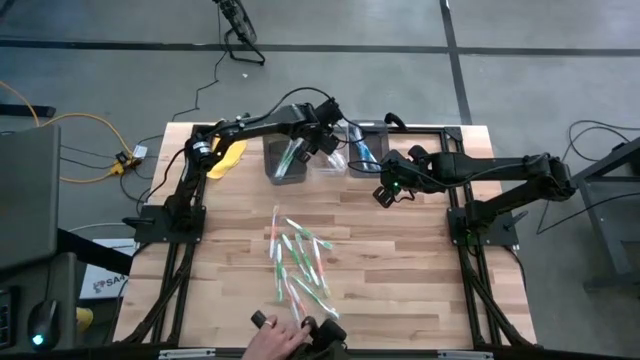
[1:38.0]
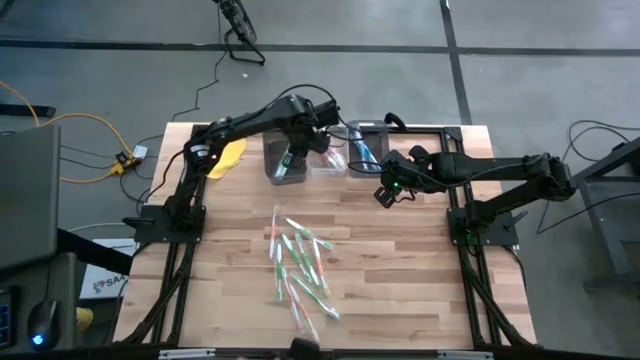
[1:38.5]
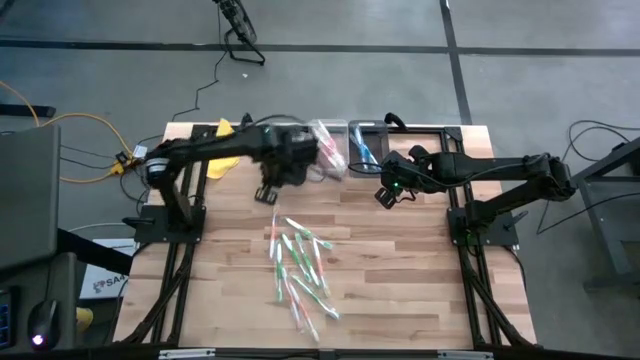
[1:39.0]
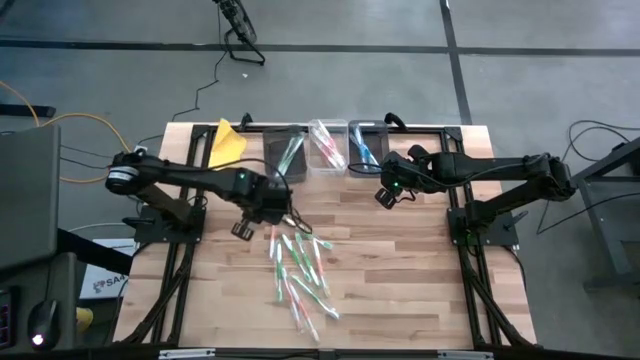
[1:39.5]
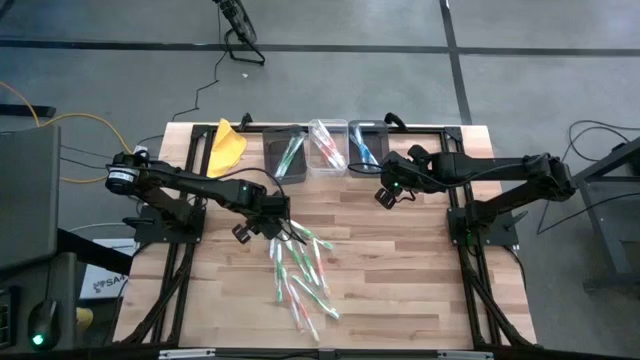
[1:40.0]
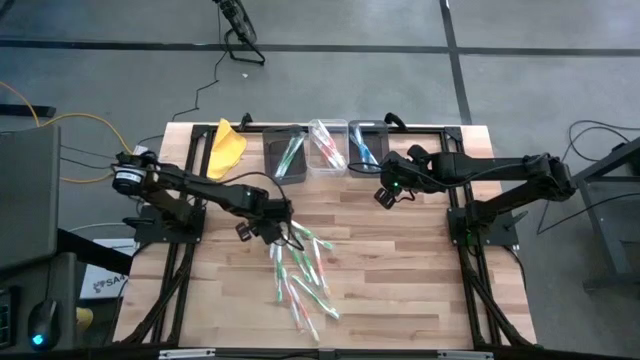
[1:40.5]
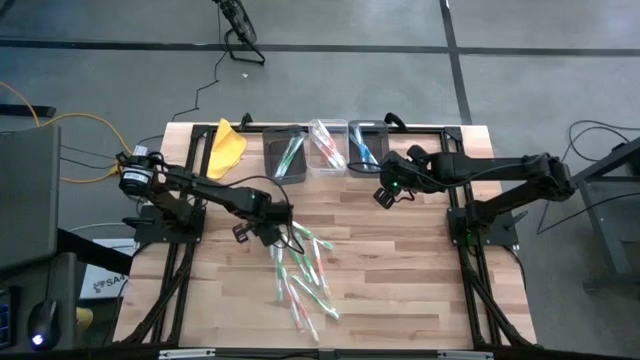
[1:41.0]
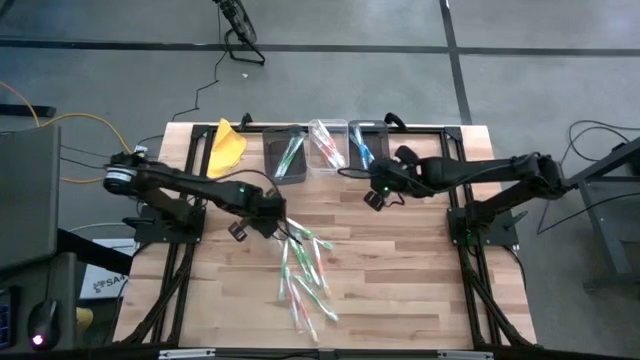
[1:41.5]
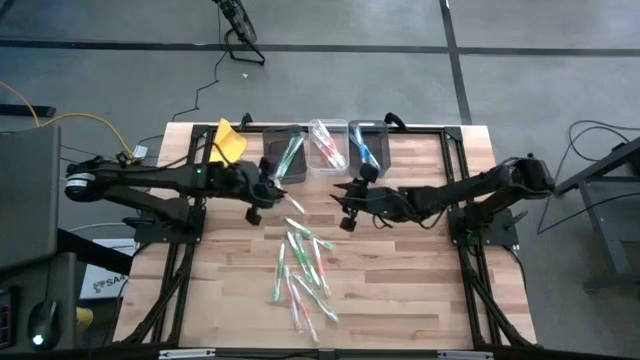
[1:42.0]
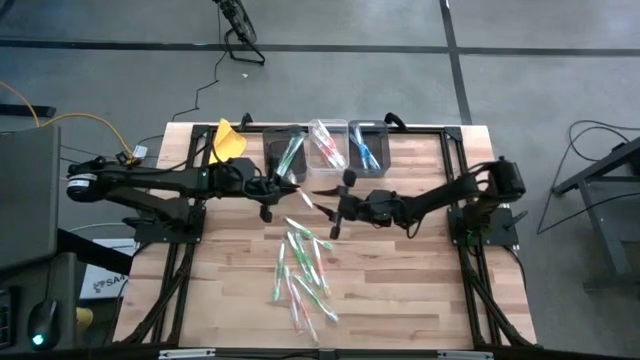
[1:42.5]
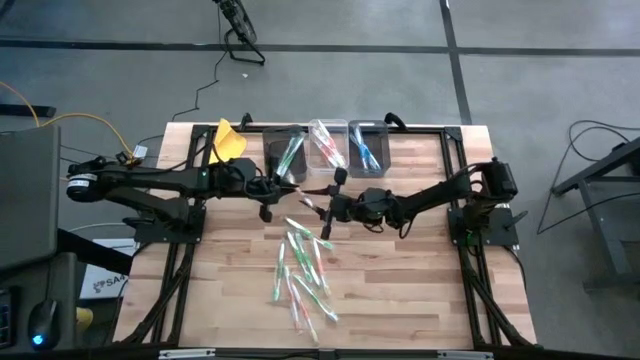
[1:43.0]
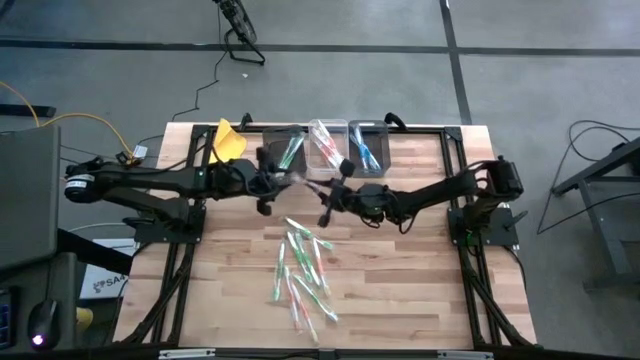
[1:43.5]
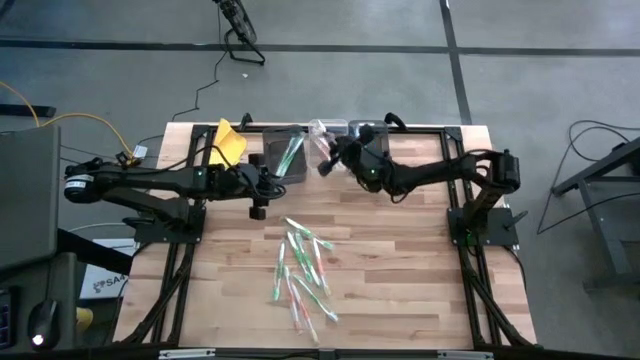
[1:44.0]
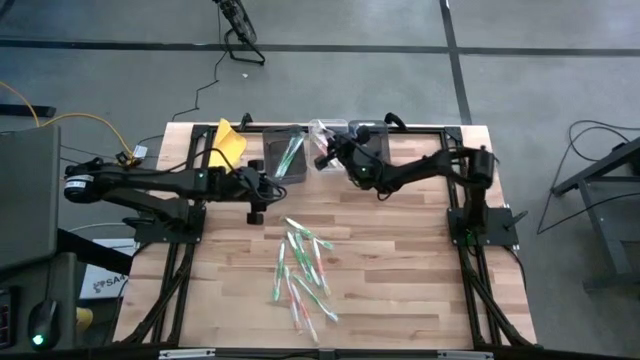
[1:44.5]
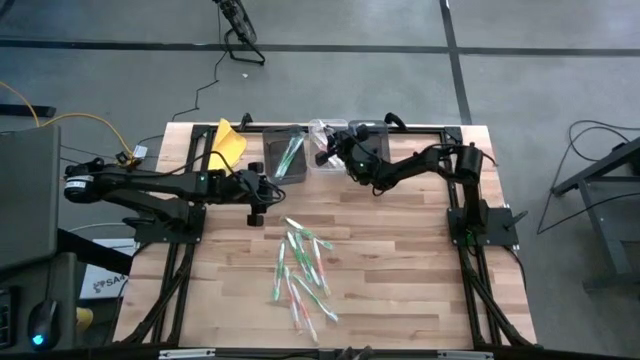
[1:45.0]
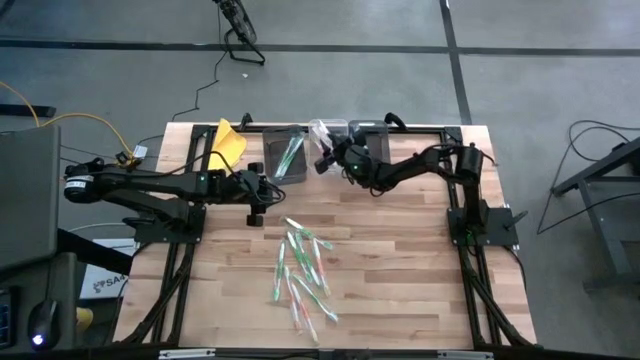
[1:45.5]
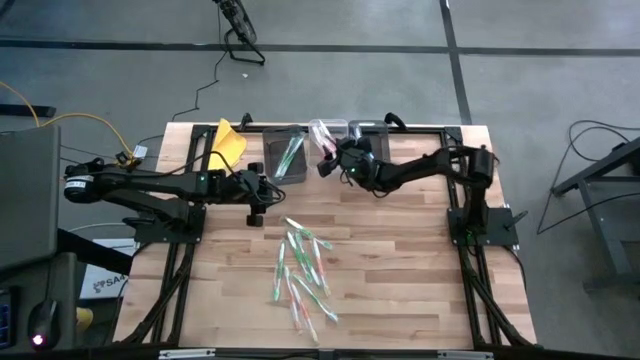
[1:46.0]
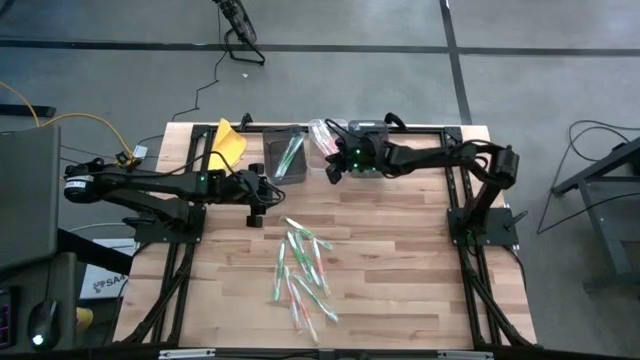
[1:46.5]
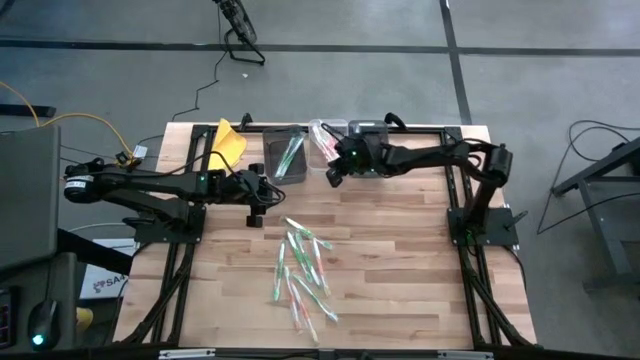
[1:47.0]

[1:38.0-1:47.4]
Task: Pick & Place Toothbrushes
Put the orange toothbrush into the transparent bin

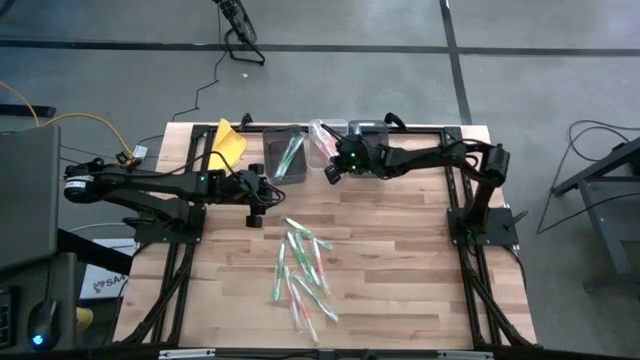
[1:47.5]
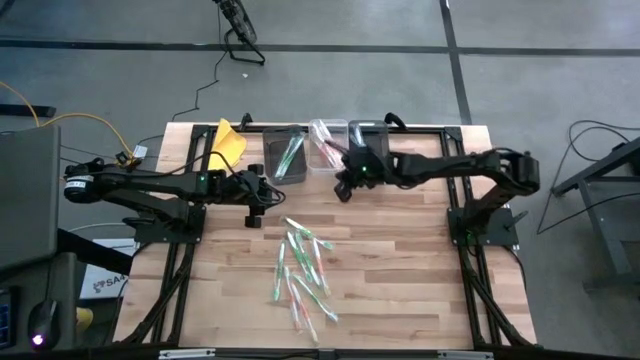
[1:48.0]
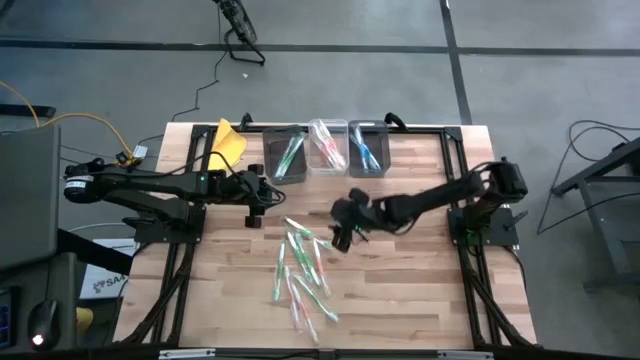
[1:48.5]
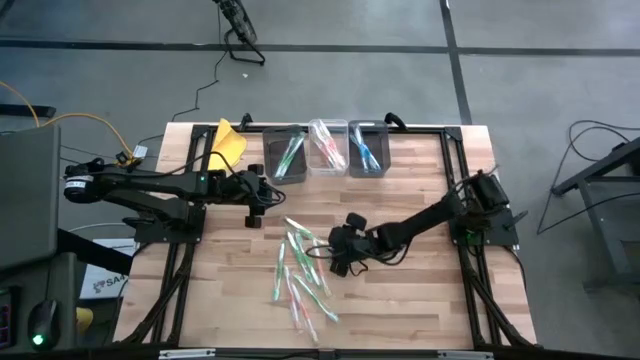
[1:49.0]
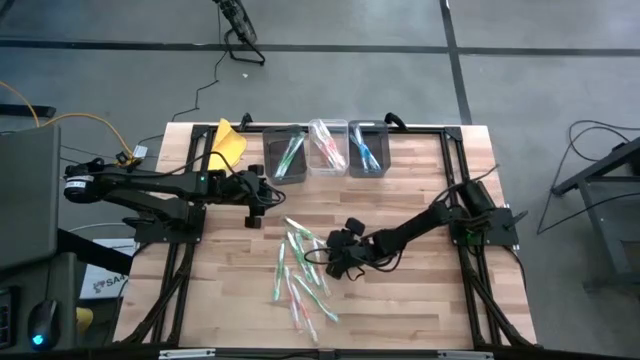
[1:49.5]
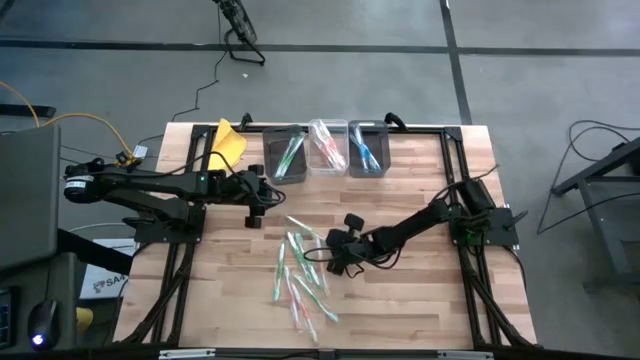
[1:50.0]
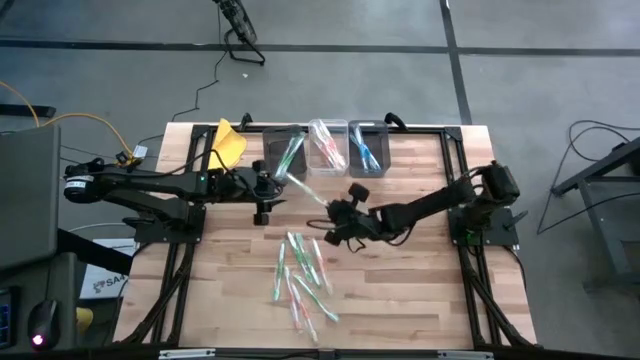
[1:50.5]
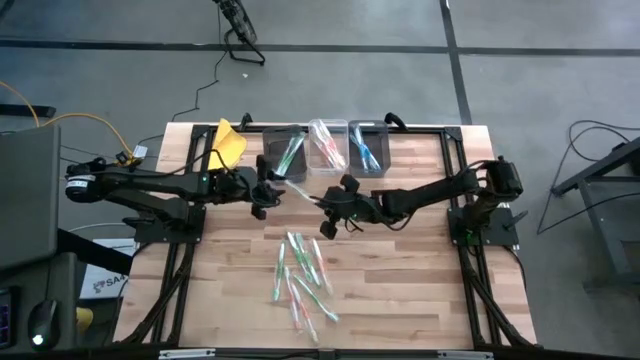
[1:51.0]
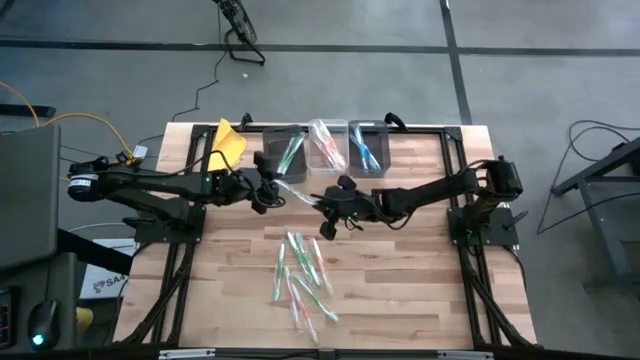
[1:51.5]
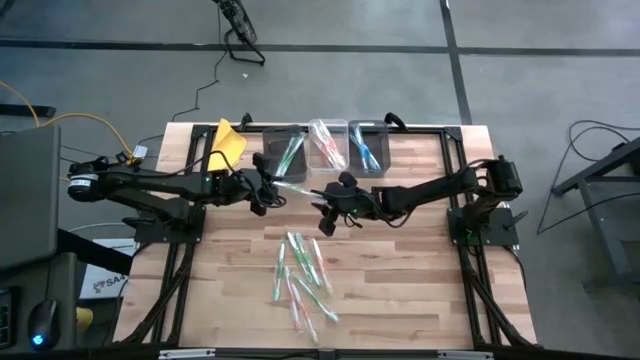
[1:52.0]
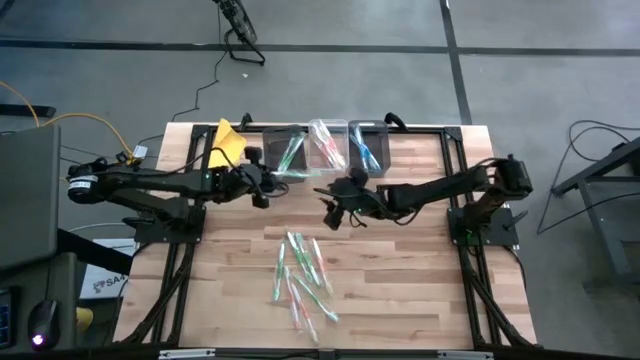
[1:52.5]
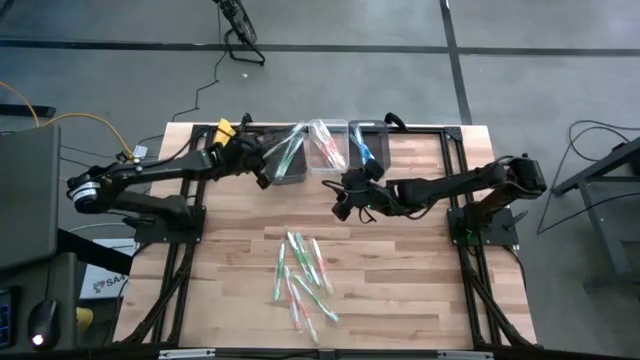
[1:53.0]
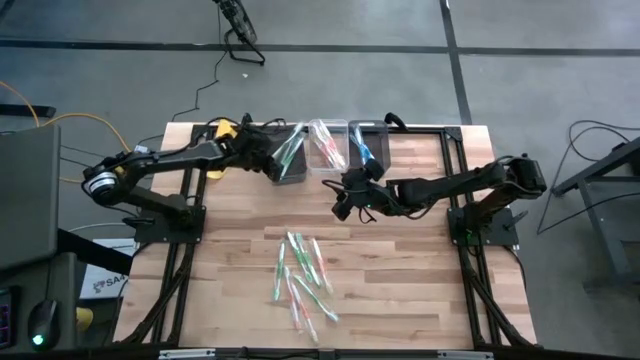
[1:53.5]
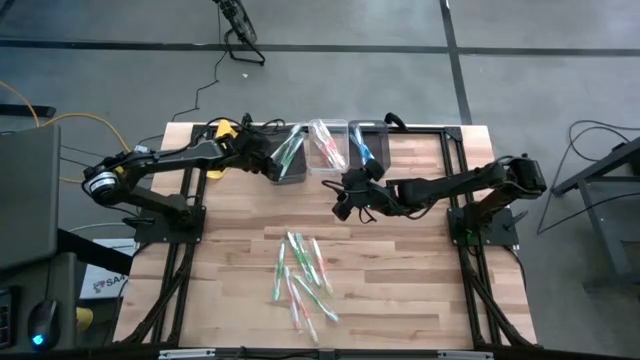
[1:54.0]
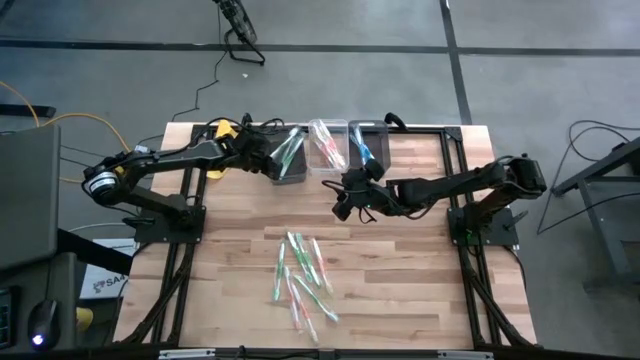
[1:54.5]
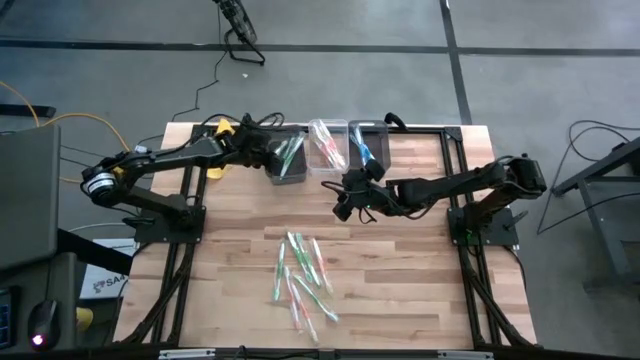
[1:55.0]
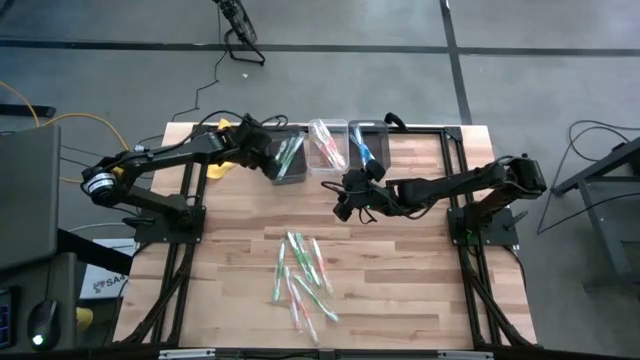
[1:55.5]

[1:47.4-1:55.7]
Put the green toothbrush into the left black bin

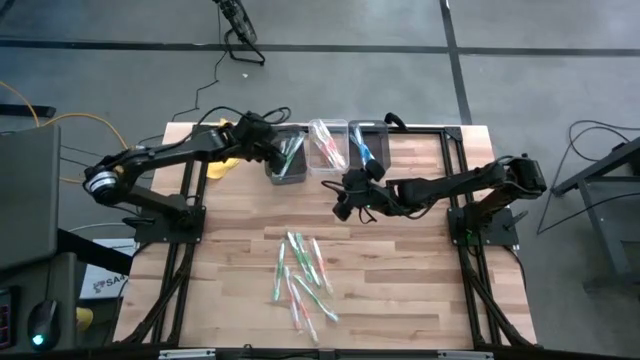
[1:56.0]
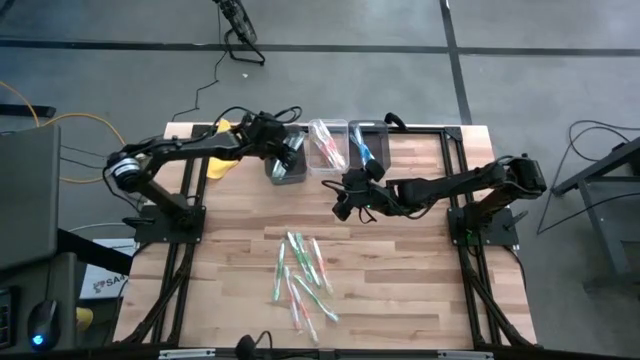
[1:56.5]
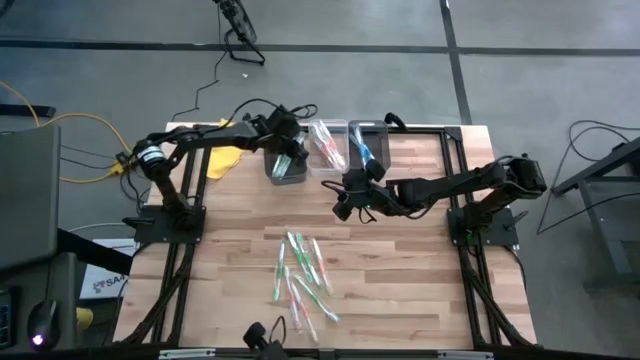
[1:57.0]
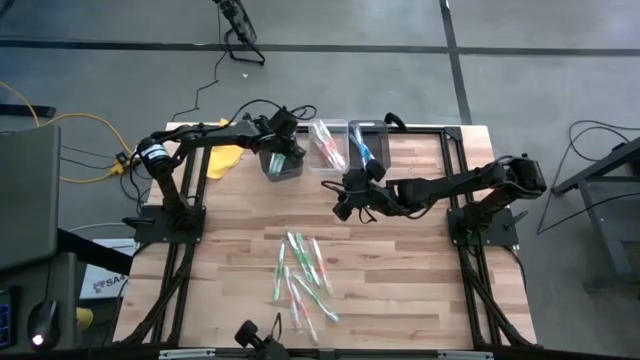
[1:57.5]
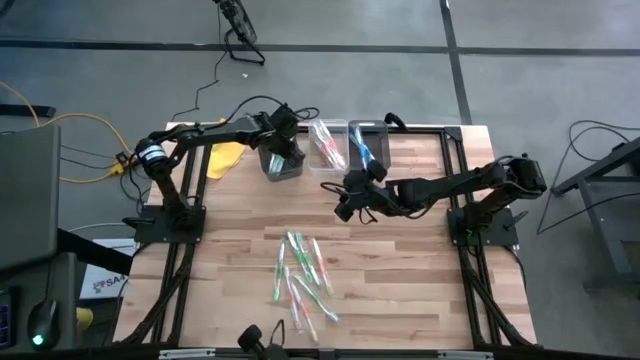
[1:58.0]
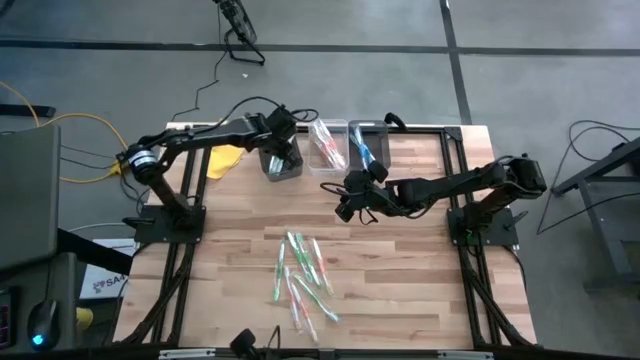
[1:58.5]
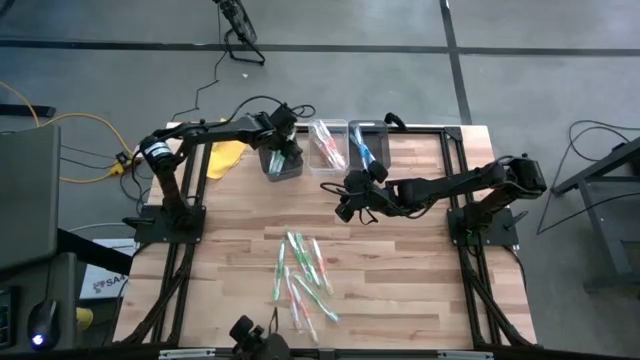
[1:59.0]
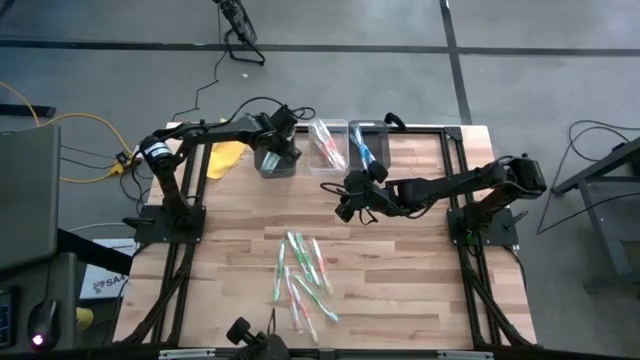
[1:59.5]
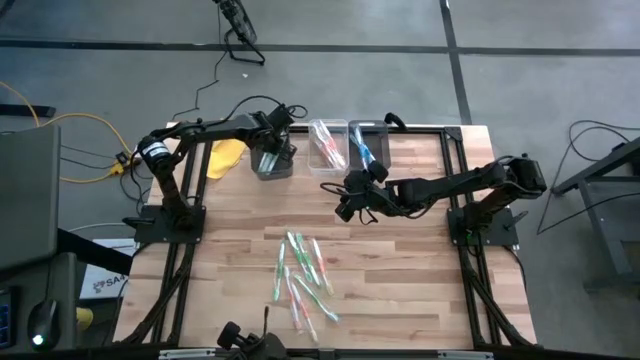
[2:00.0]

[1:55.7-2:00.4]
Adjust the green toothbrush in the left black bin
